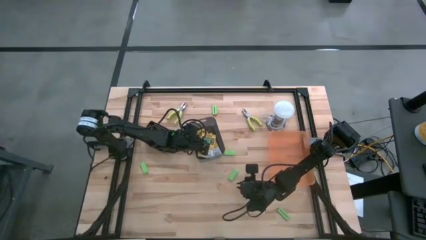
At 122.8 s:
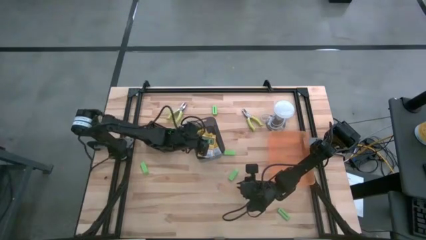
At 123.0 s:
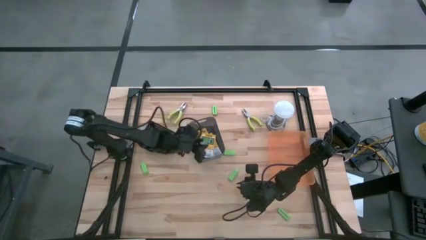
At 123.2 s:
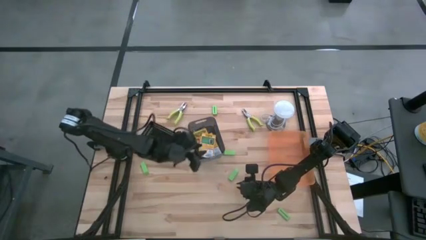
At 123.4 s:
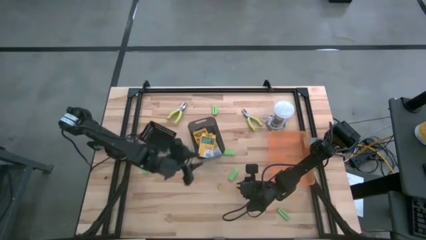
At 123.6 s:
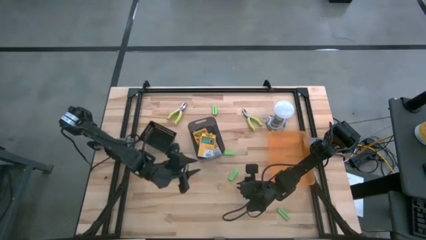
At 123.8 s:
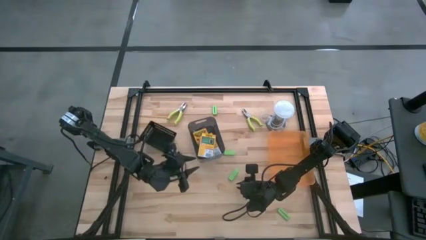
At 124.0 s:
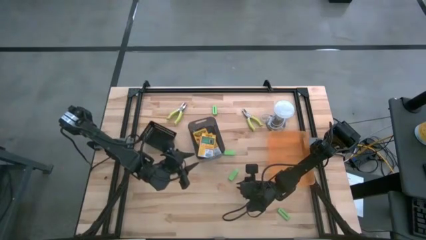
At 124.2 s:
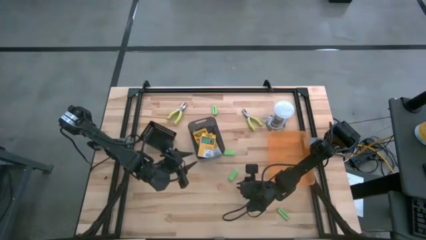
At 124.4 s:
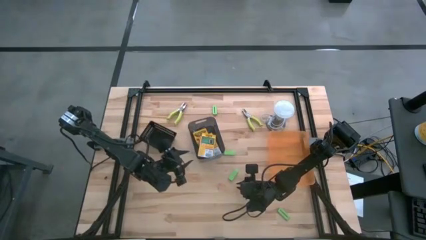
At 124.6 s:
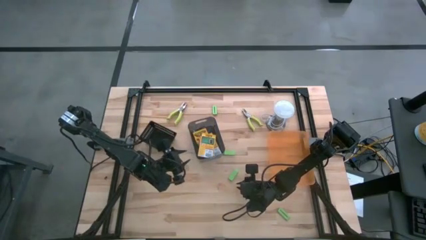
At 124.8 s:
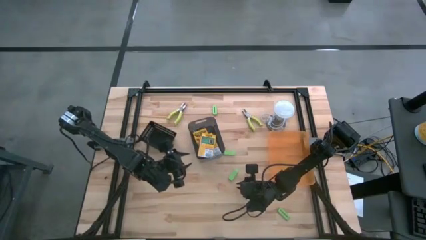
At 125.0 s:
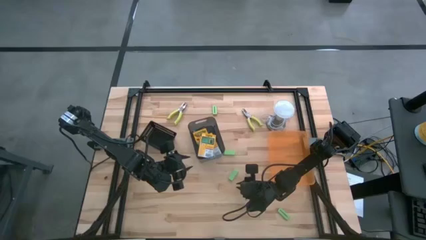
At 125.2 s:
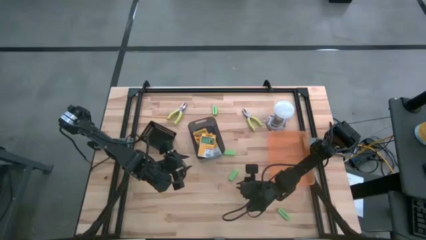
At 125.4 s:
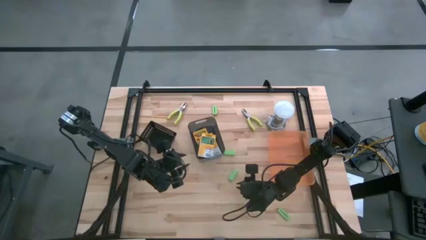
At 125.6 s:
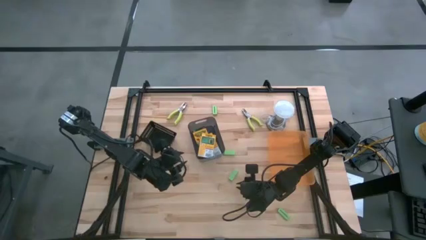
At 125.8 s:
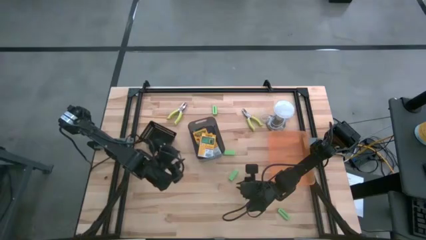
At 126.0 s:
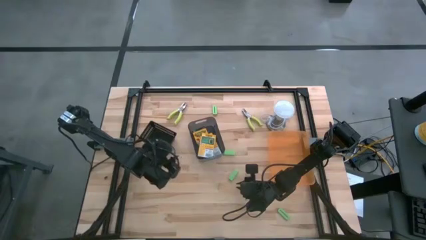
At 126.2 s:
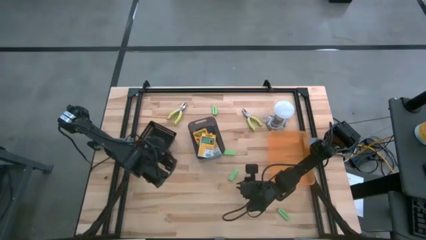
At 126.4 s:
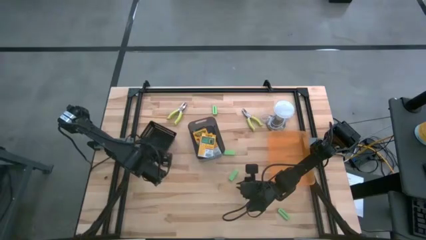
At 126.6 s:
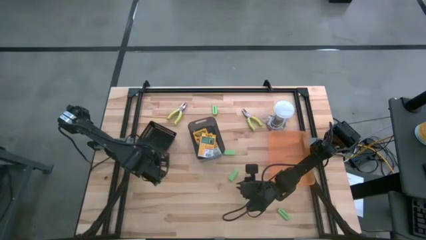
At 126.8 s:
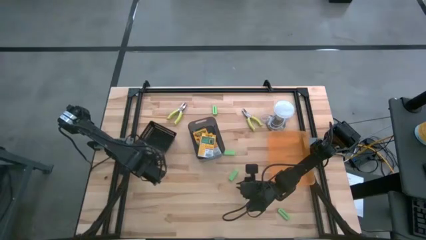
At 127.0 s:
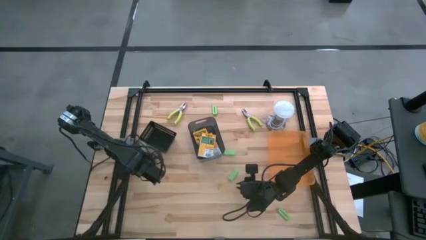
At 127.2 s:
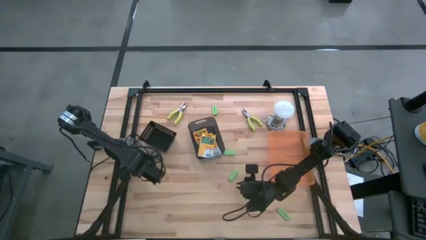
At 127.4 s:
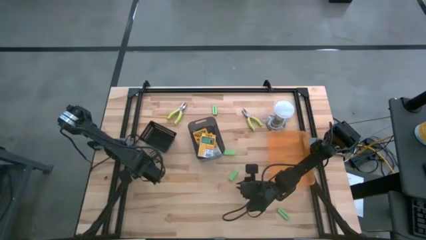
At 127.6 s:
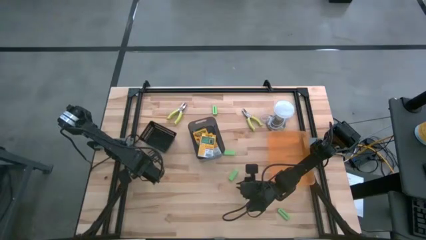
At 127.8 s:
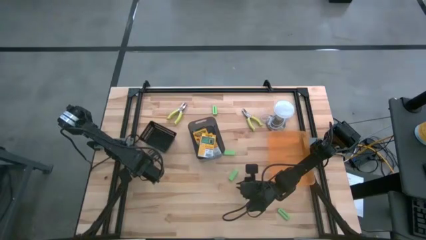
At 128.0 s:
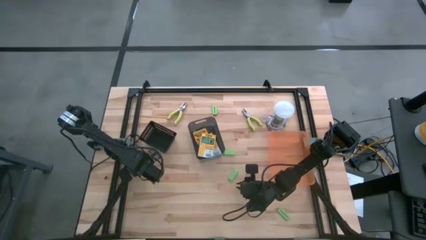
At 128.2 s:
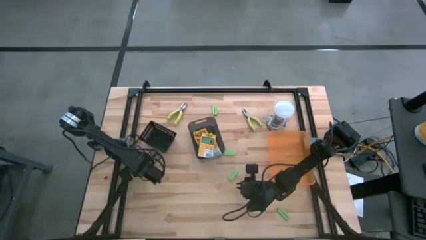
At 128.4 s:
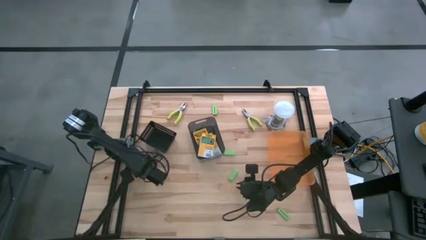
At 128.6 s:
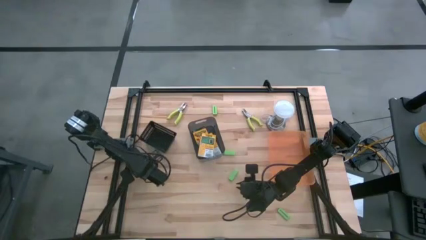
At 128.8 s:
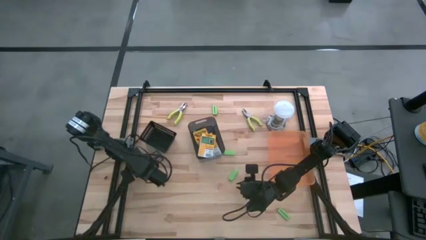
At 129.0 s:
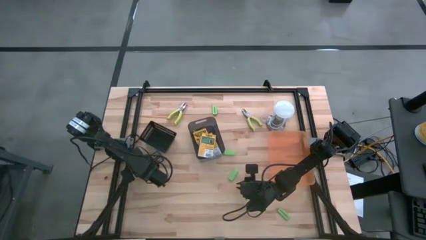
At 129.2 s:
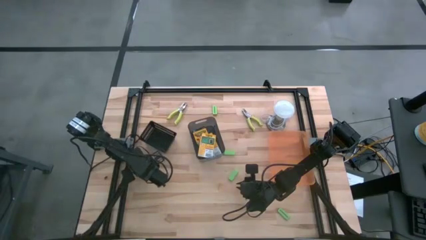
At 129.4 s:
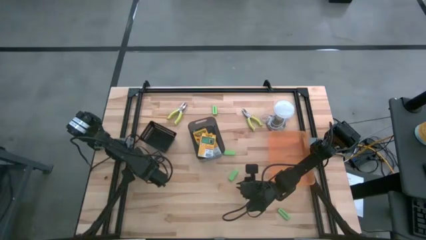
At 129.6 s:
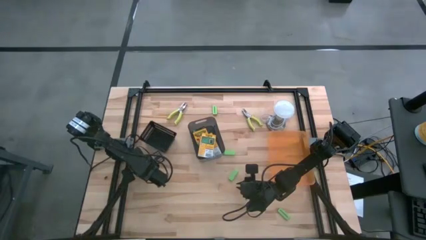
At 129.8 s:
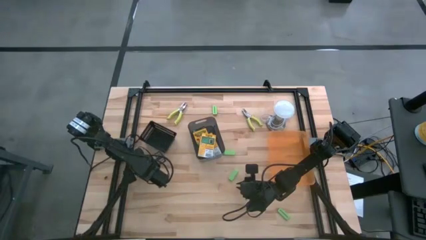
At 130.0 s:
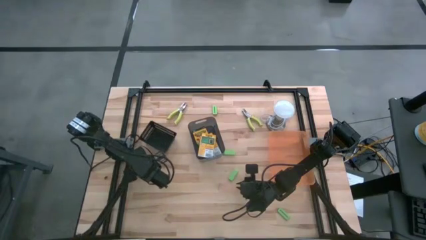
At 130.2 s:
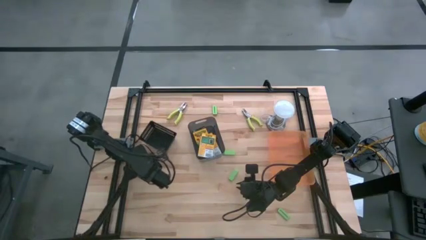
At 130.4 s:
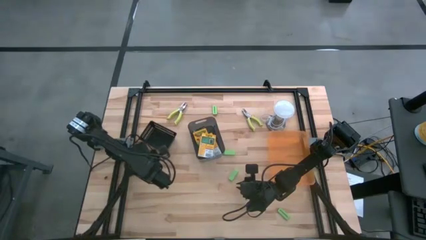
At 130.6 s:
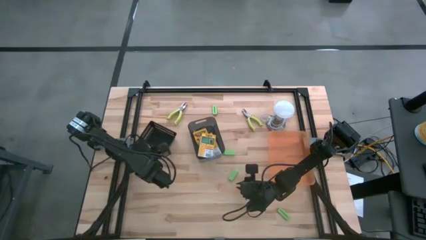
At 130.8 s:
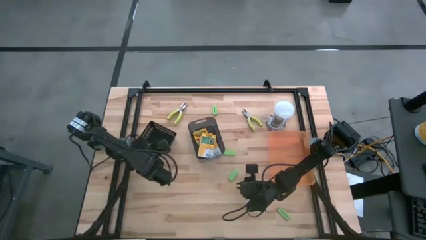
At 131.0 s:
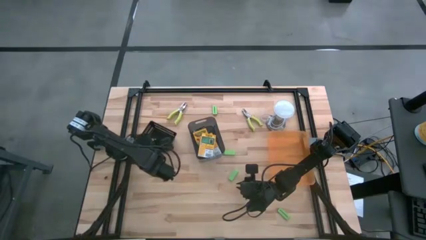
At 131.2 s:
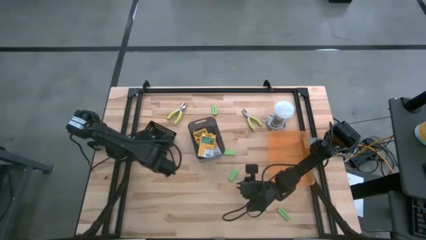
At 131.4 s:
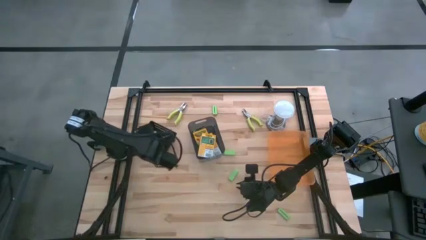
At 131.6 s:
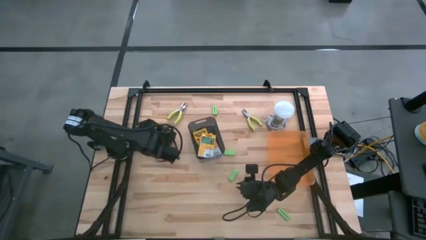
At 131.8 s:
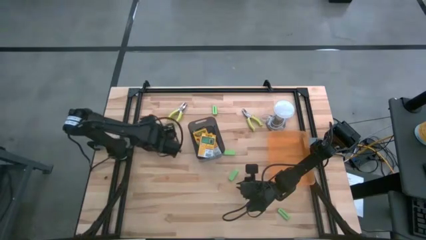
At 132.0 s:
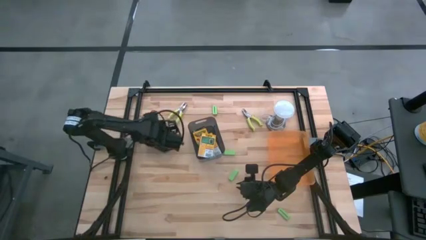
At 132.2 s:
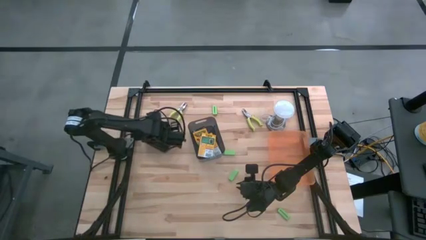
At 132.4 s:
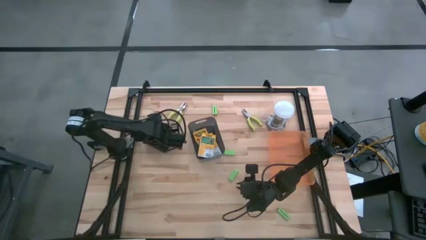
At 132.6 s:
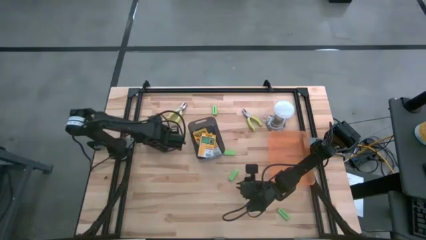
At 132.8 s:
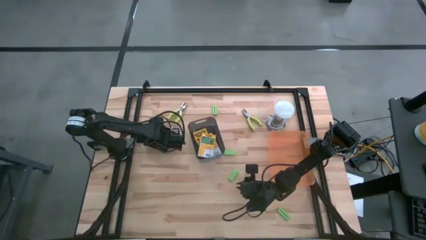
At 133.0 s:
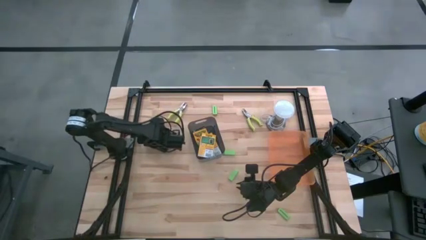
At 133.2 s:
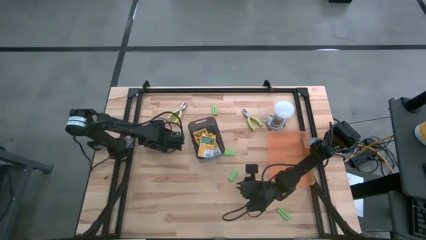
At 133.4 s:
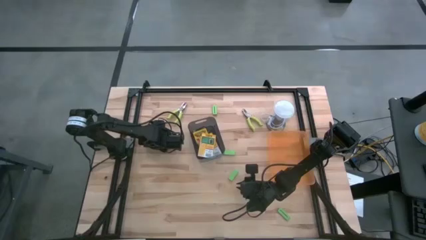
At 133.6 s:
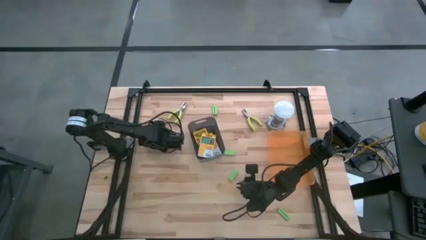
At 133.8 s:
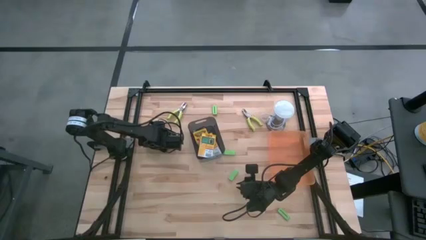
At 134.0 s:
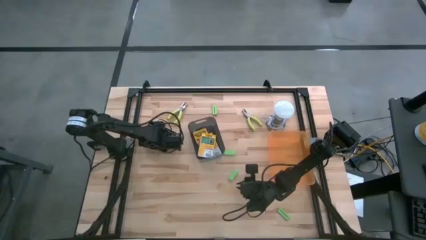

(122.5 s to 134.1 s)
Task: Pick & Place School Supplies
Put the light green eraser into the black bin

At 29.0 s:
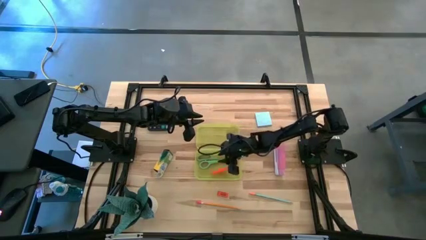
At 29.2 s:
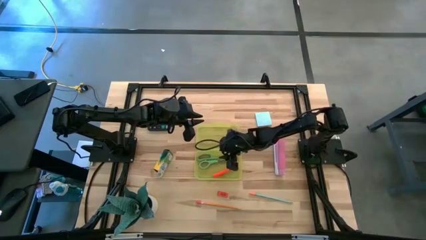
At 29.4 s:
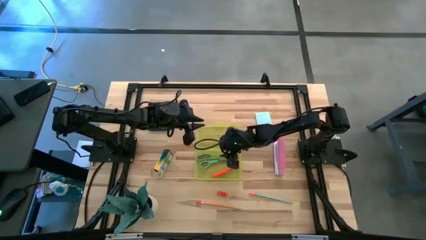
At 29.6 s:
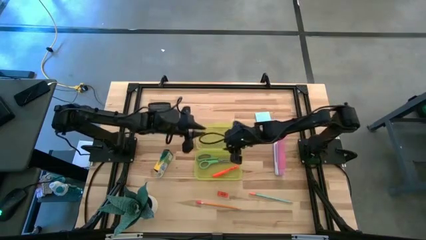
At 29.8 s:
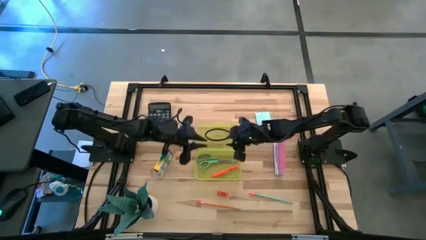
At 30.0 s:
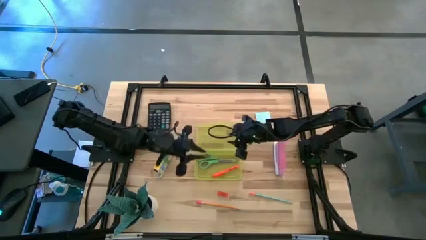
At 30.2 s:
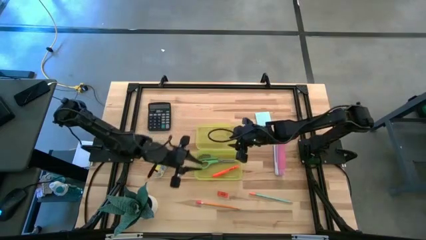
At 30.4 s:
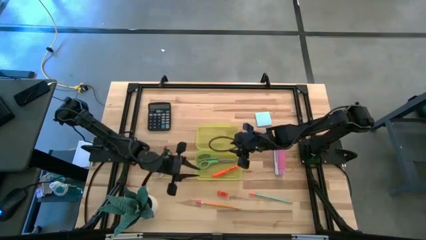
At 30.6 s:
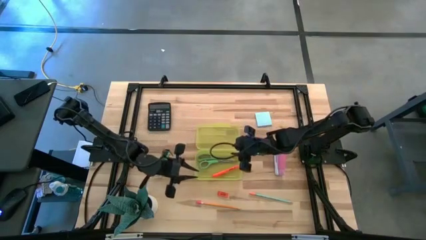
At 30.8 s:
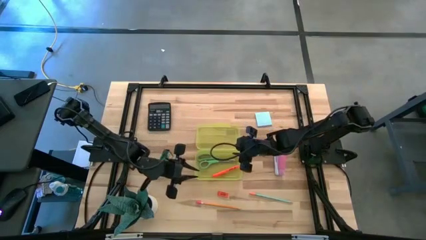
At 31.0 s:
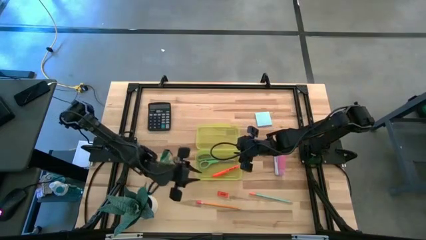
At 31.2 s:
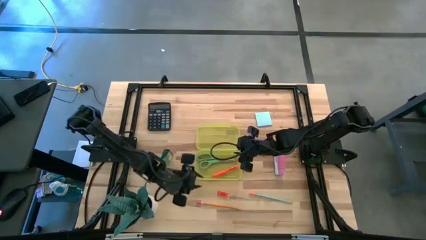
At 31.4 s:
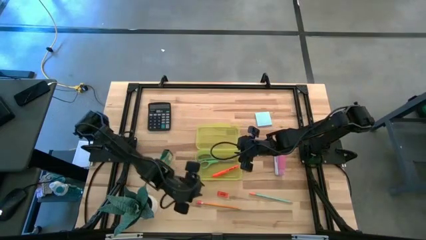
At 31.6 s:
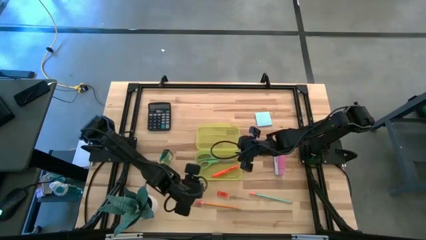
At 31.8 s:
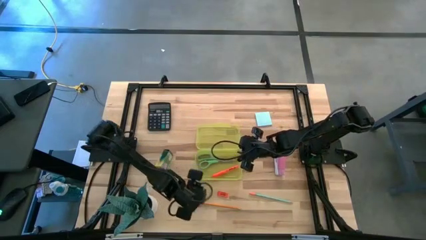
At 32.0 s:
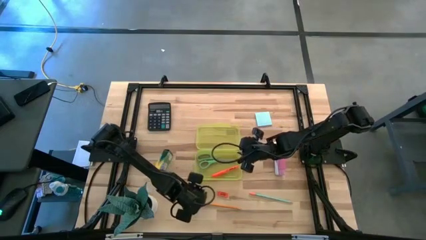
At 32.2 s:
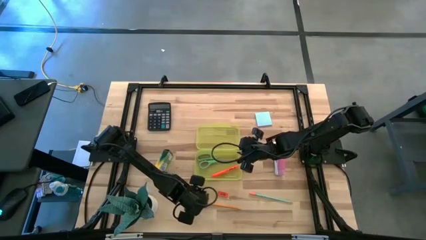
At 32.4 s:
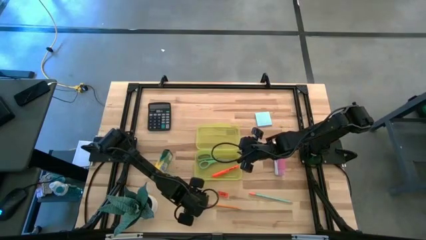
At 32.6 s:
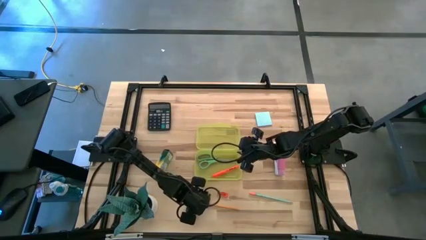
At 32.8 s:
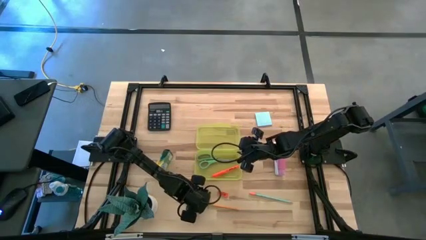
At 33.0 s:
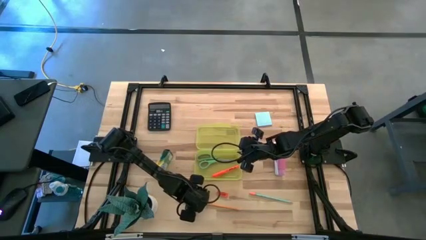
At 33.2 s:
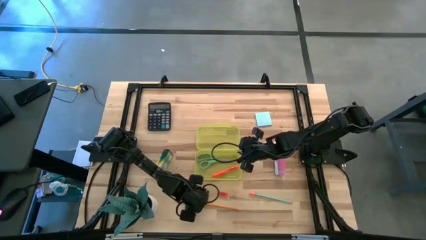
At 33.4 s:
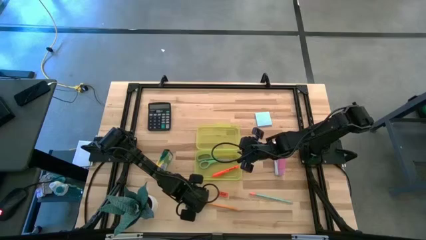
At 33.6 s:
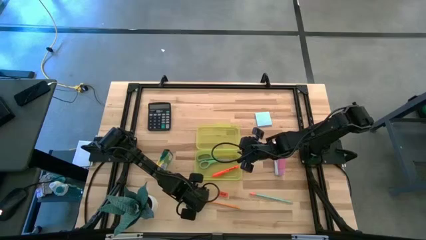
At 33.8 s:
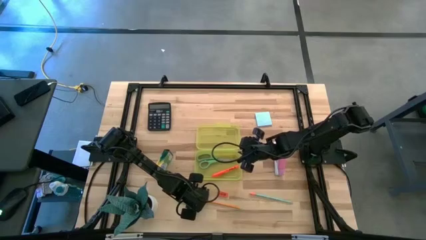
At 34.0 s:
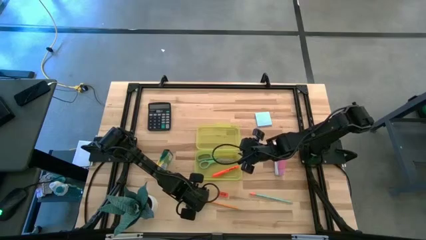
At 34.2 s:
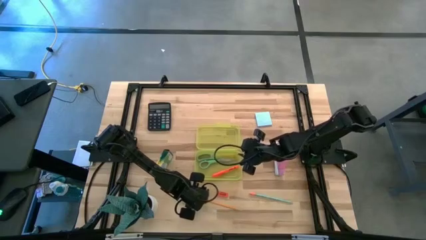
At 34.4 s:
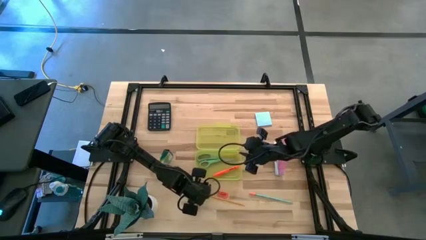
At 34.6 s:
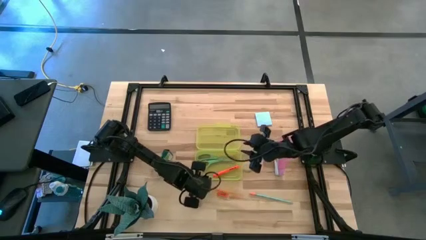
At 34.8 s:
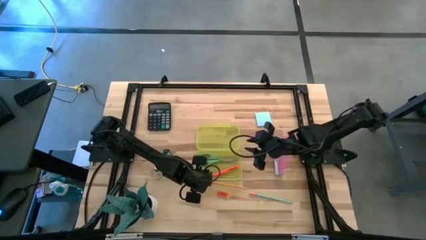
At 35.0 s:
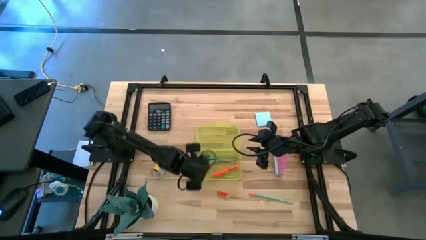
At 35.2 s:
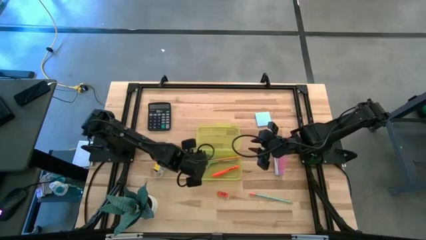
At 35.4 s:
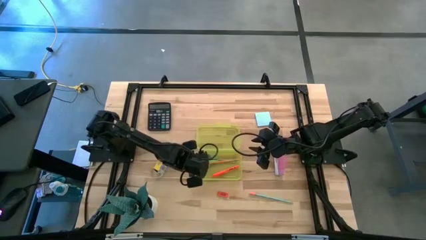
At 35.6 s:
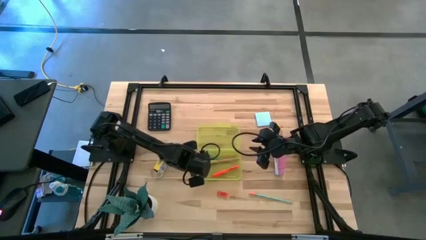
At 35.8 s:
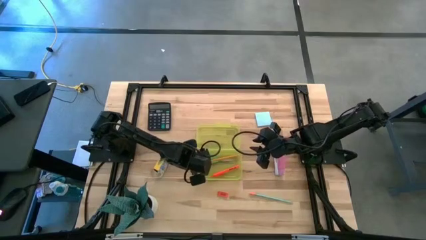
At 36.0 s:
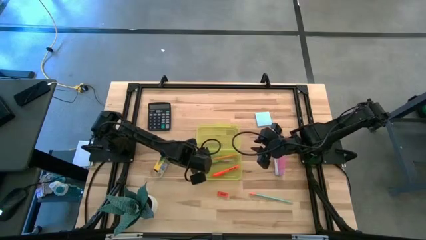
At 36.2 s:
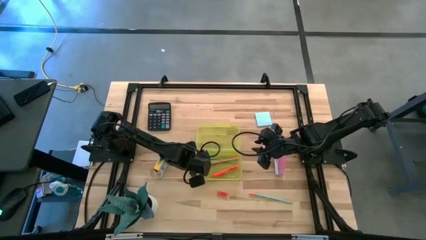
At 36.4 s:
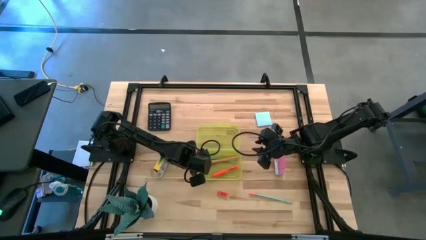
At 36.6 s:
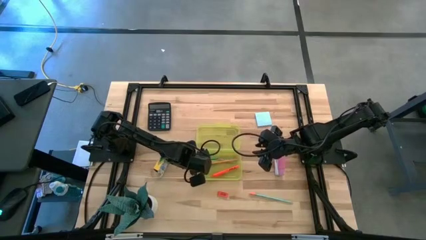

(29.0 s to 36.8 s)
Task: Pack school essentials
Put the orange pencil into the yellow supply box
